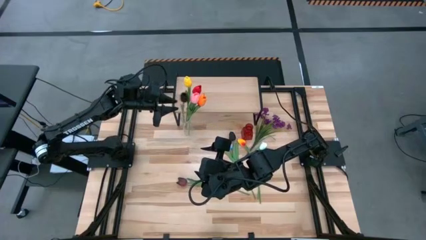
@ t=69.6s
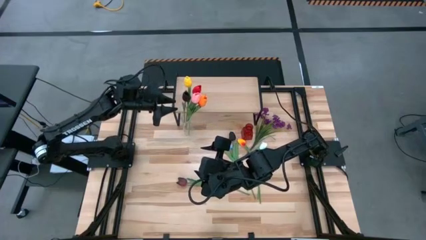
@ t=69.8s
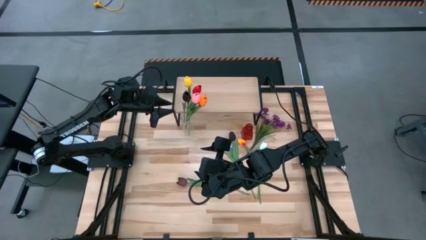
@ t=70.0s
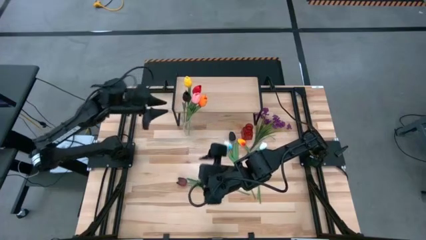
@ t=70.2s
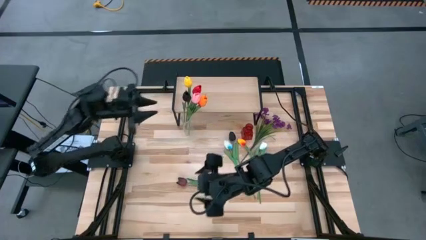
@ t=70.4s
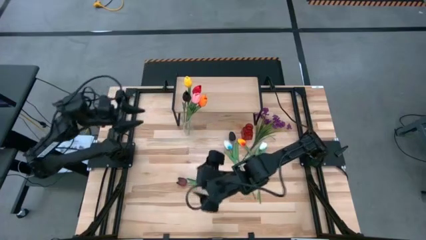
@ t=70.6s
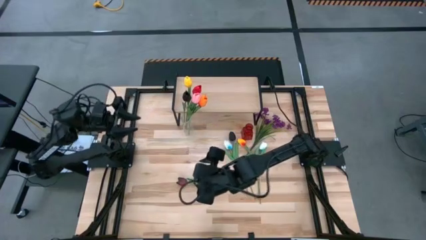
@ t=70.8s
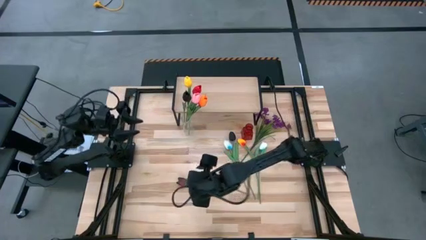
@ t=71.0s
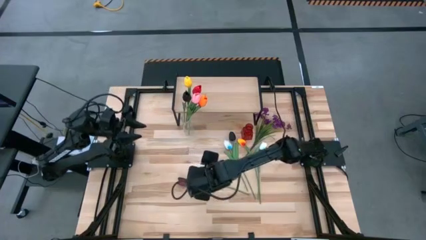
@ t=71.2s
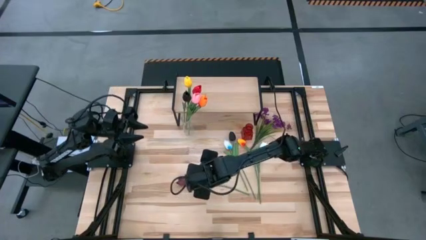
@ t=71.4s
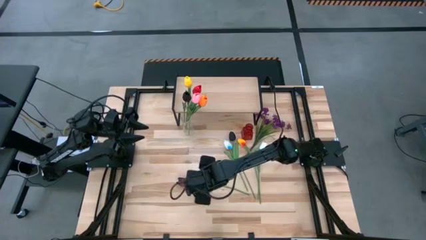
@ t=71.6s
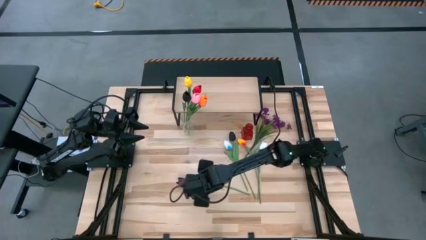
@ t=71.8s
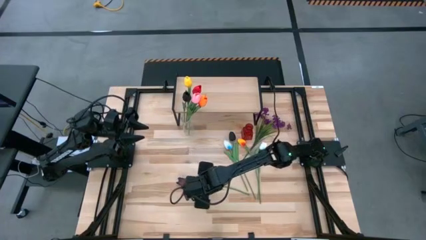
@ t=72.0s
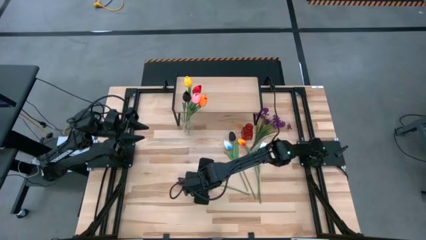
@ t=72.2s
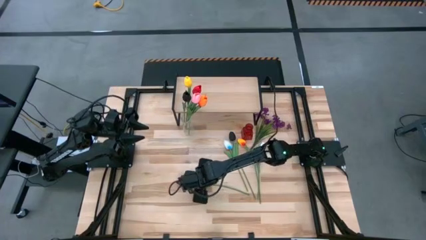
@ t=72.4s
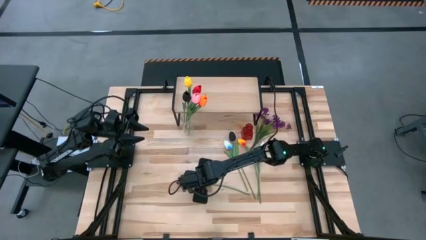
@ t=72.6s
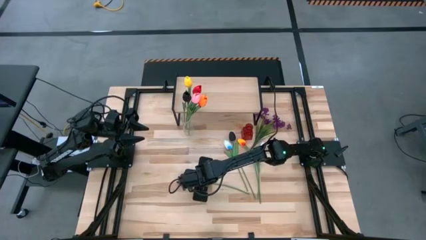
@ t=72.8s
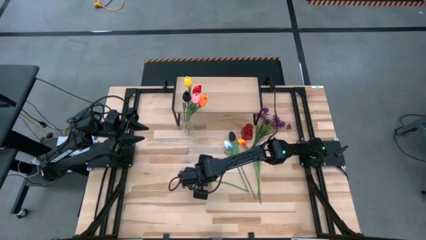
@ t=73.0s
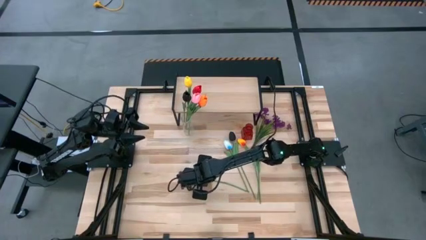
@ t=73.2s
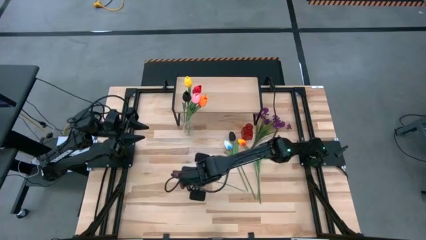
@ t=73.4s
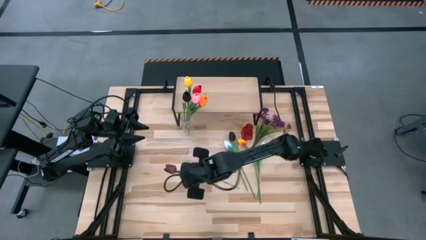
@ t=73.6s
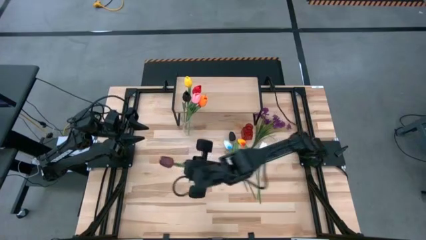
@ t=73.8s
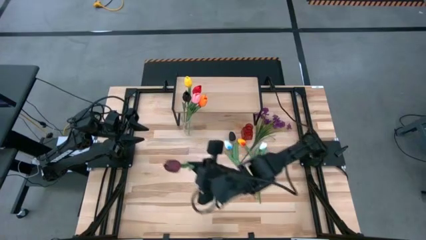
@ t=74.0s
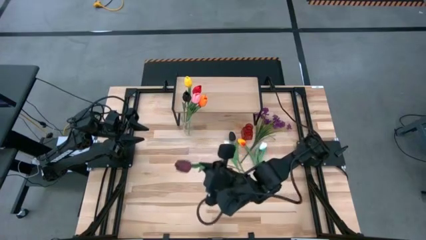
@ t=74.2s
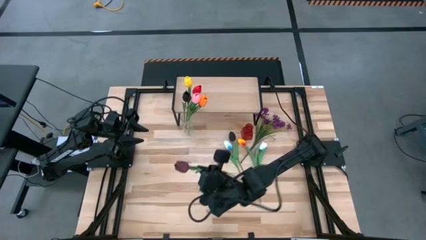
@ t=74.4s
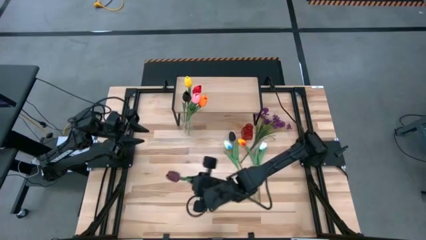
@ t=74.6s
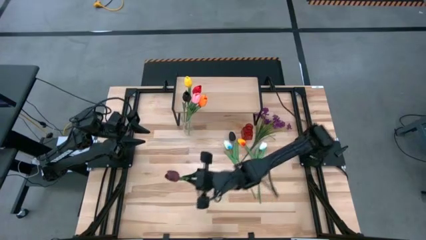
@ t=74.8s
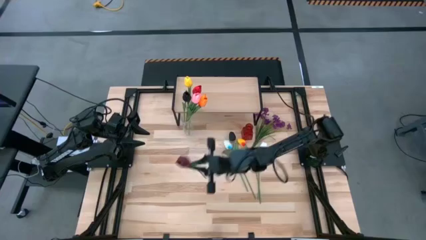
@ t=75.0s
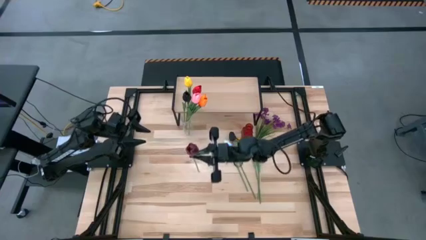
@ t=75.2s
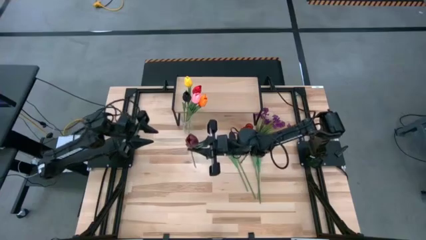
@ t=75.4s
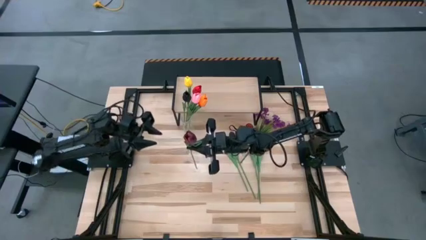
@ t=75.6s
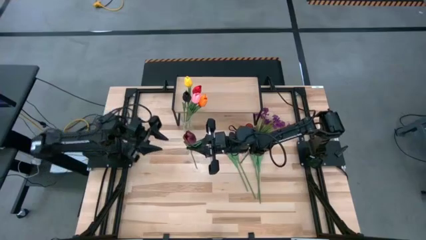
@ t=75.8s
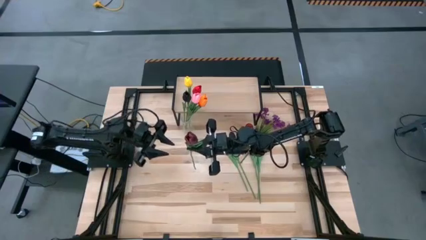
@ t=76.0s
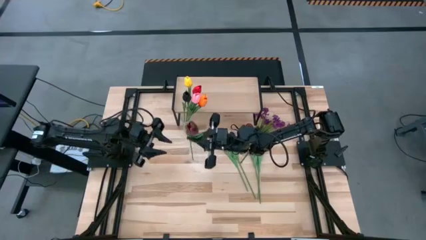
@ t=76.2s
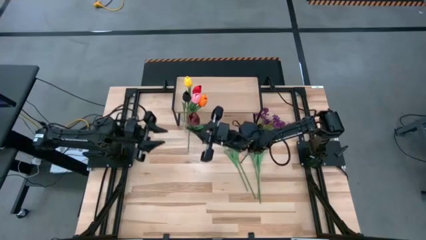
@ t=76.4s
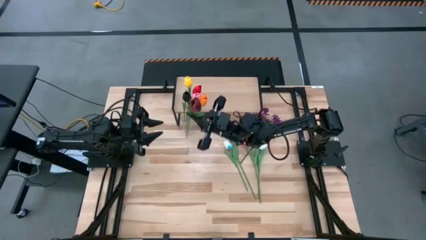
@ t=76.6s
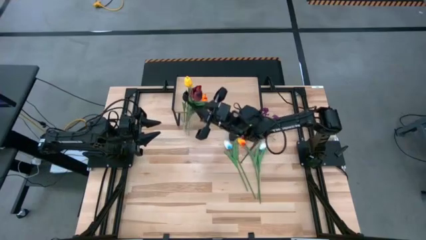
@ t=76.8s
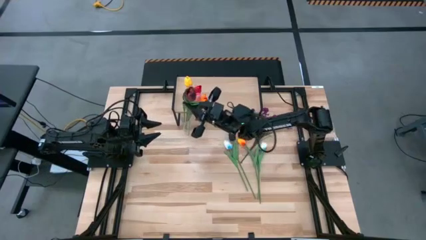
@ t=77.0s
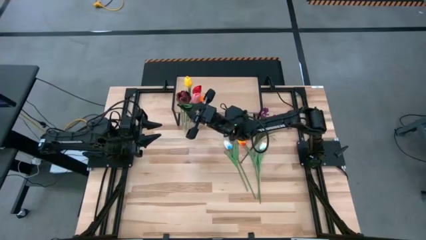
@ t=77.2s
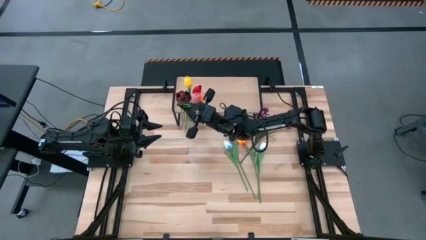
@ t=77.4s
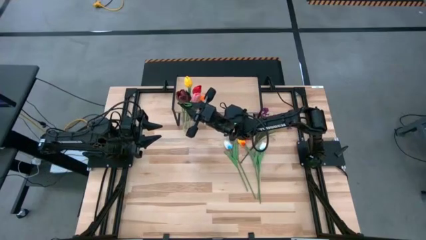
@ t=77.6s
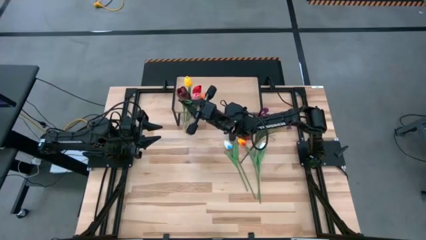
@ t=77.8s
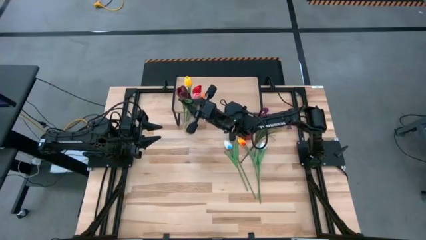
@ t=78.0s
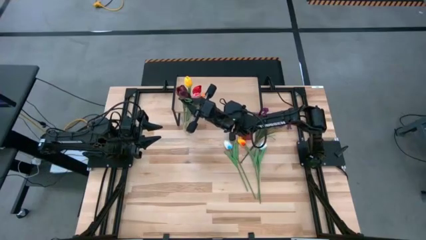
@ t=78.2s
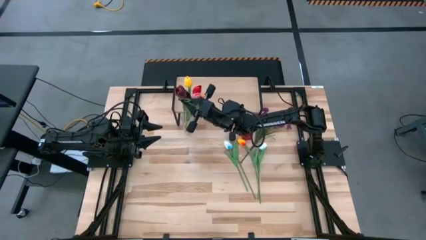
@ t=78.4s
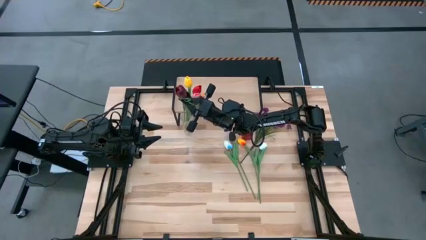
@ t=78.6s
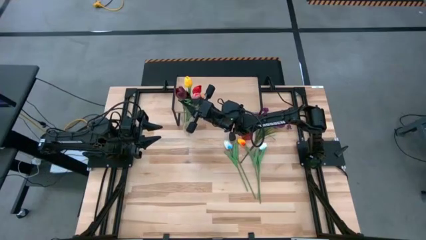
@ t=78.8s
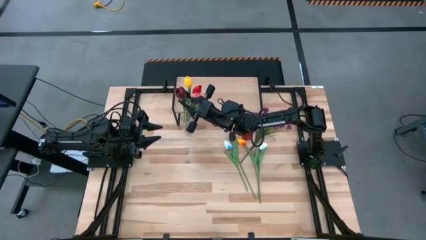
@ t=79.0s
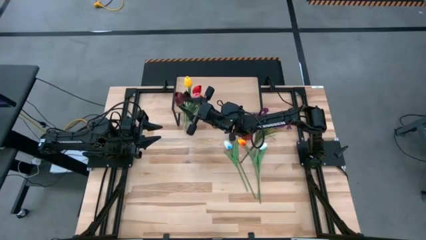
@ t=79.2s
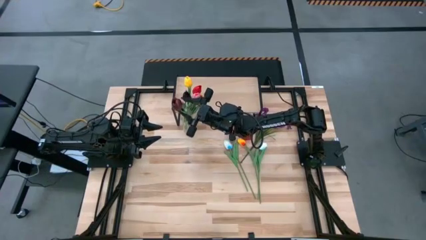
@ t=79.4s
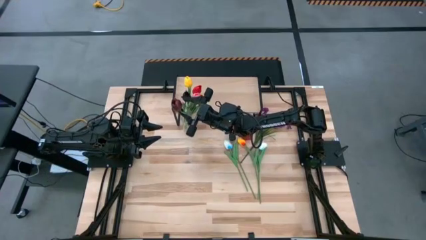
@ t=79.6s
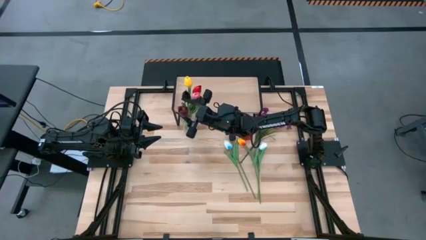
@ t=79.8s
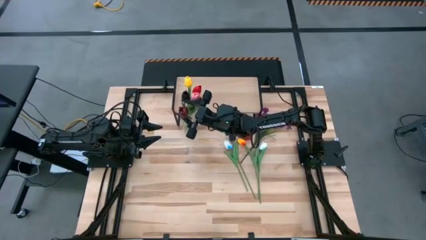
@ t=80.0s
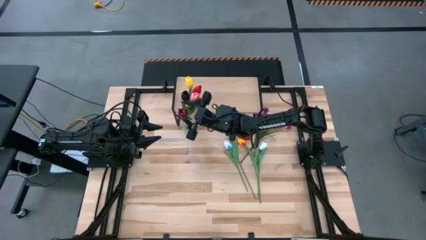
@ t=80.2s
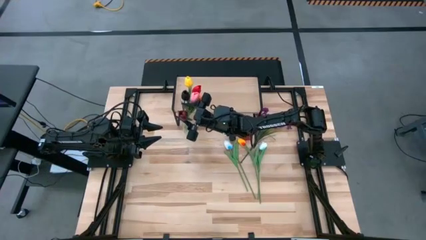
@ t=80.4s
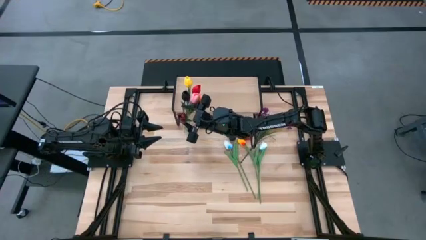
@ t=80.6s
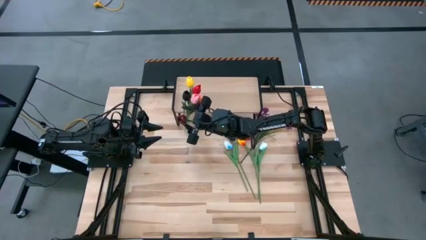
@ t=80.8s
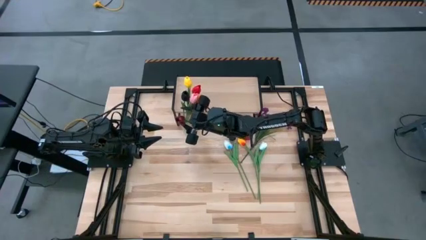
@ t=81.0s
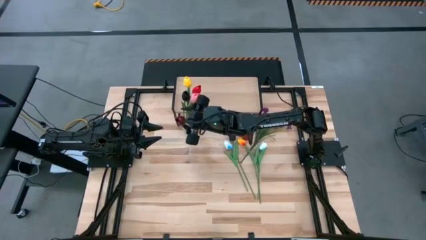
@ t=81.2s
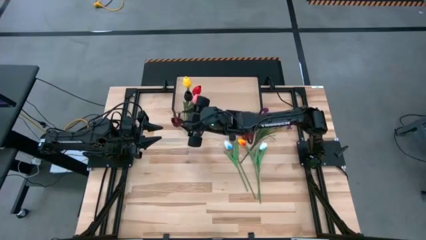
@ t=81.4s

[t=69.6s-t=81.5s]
Task: Pick and place flowers into a vace then onto a shelf
Put the dark red flower into the transparent vase

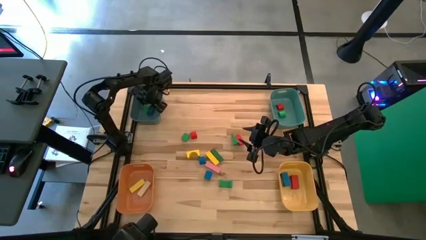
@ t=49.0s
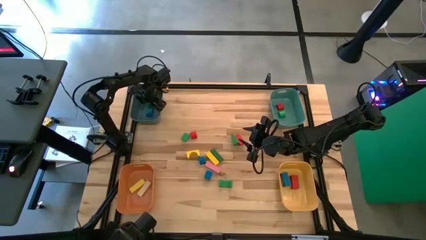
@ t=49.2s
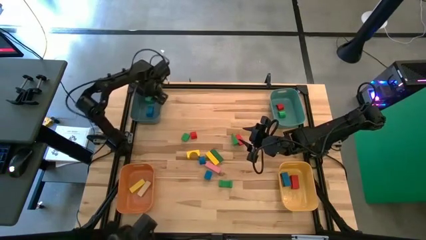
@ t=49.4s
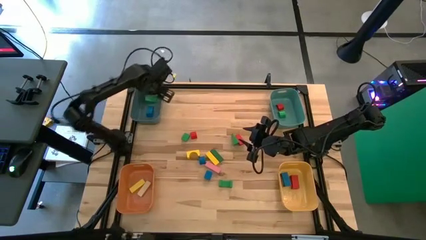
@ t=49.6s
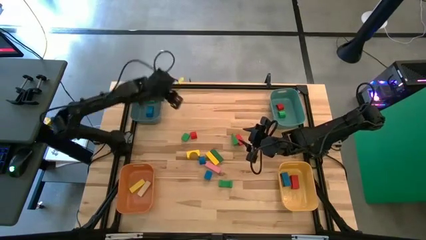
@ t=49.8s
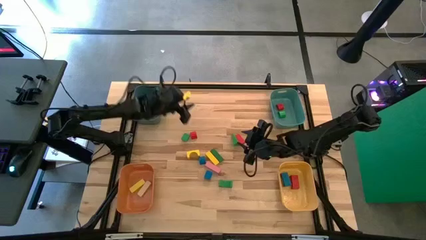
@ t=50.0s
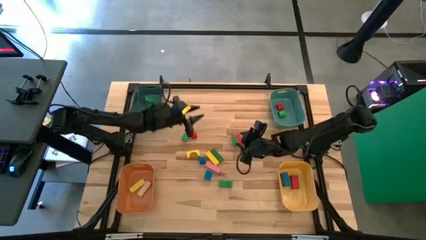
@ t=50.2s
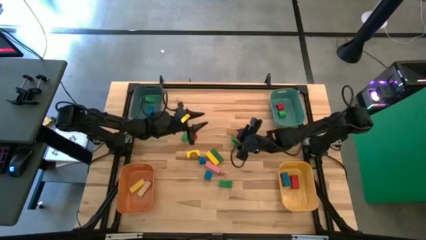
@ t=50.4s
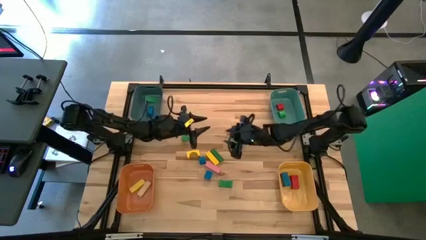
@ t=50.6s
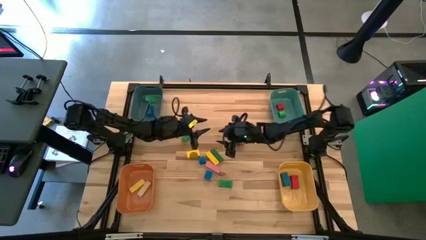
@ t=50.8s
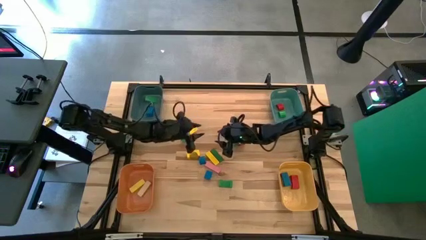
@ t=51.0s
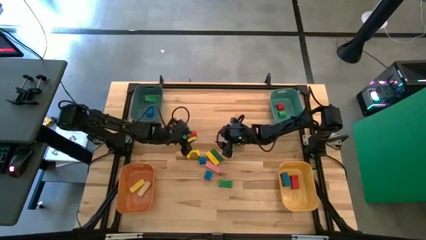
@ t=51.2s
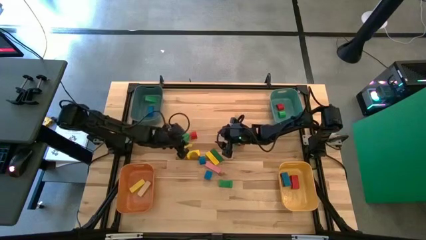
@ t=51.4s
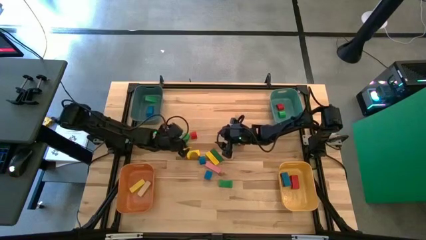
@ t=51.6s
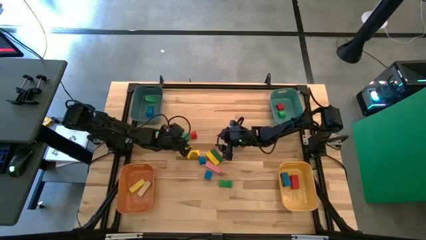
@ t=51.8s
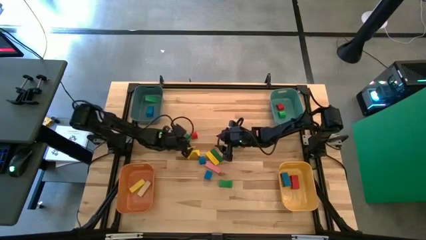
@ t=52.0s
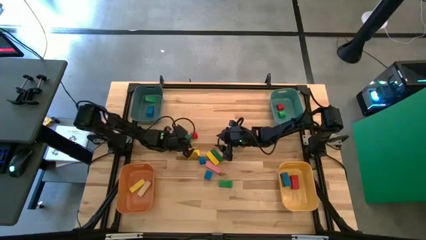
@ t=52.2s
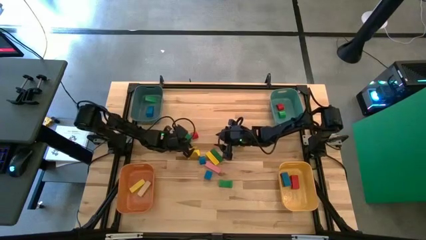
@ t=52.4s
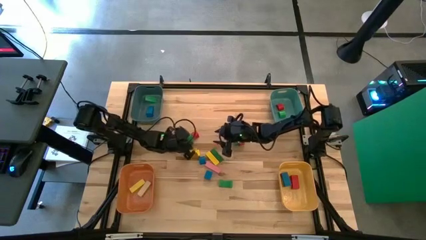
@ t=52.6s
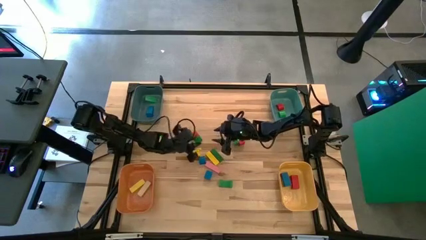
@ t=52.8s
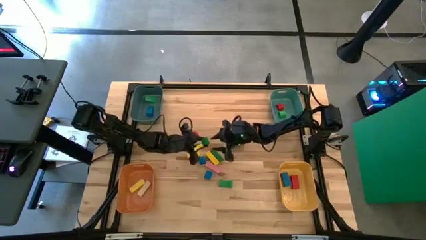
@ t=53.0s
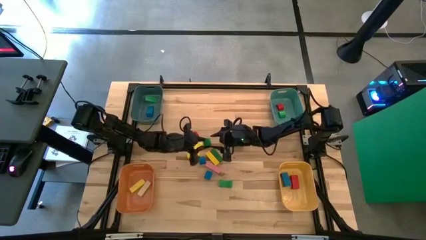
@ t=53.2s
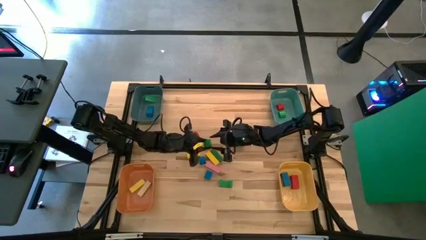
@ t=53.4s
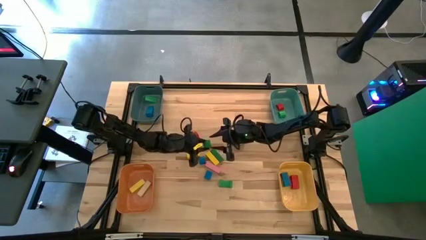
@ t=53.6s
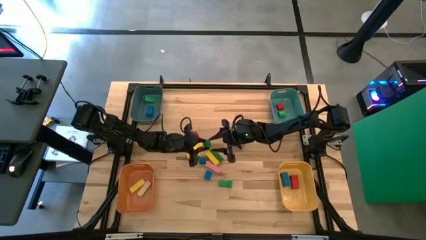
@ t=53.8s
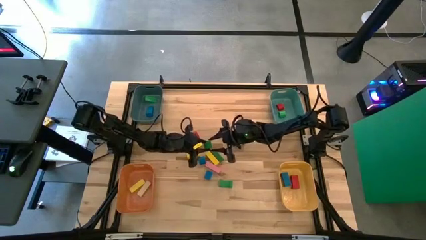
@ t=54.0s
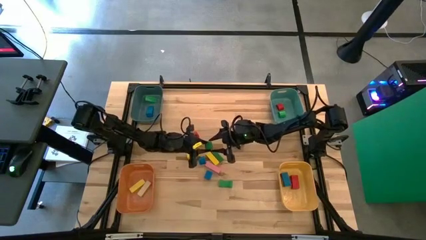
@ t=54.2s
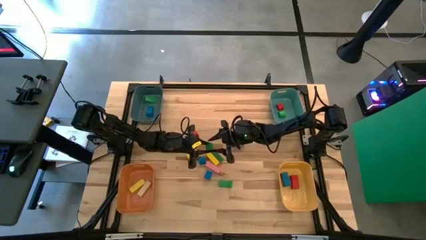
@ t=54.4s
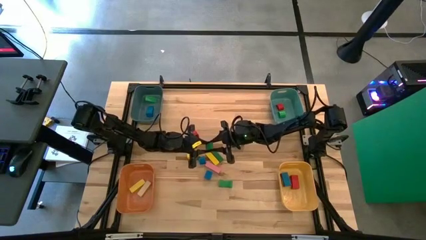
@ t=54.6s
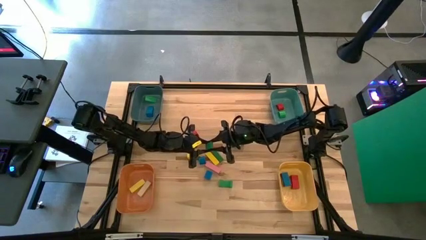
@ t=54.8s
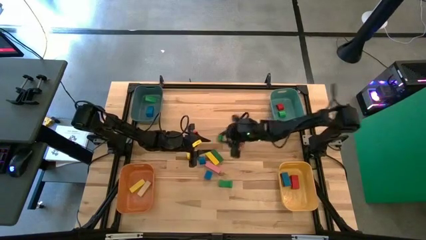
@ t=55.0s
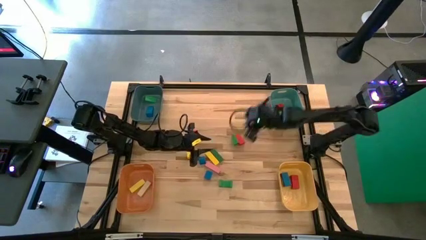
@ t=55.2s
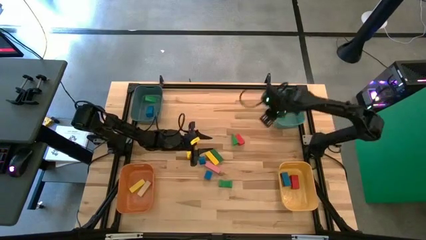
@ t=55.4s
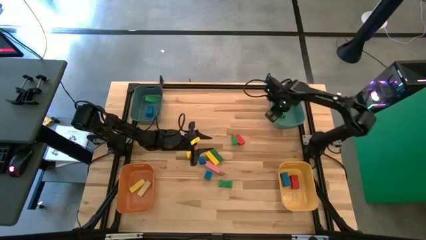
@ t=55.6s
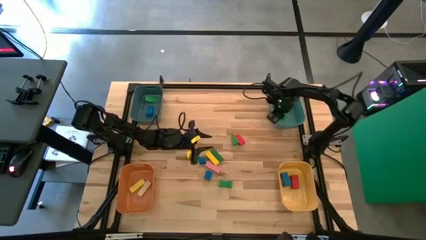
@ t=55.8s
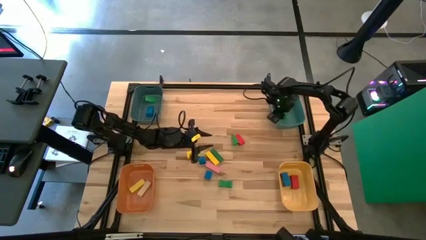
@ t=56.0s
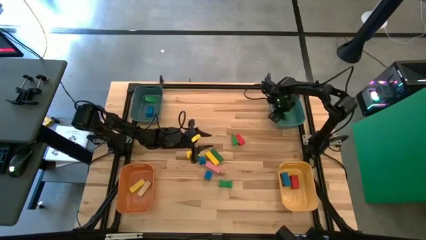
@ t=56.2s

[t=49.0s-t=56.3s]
Task: Sort blocks by size
Put the green semicircle block into the green bin
